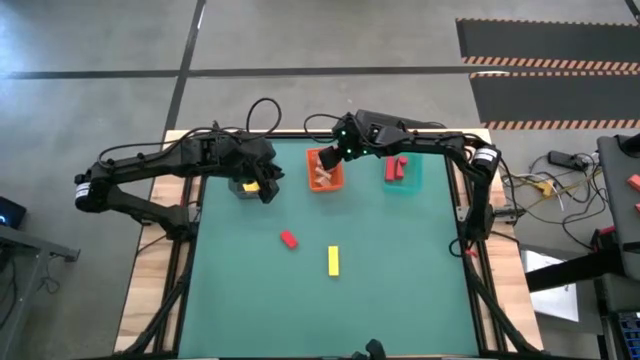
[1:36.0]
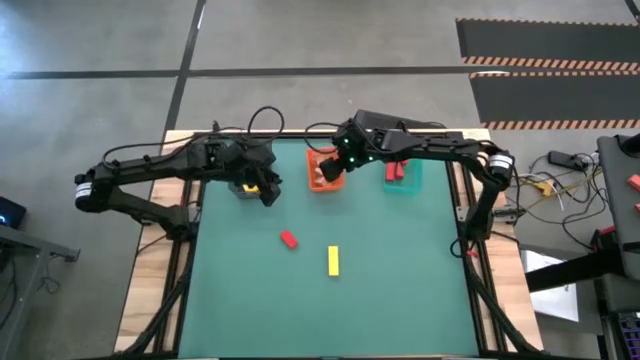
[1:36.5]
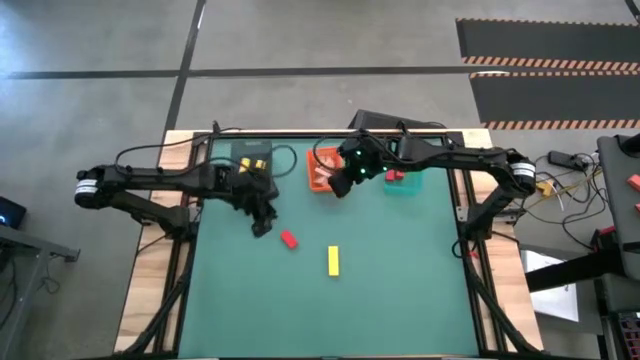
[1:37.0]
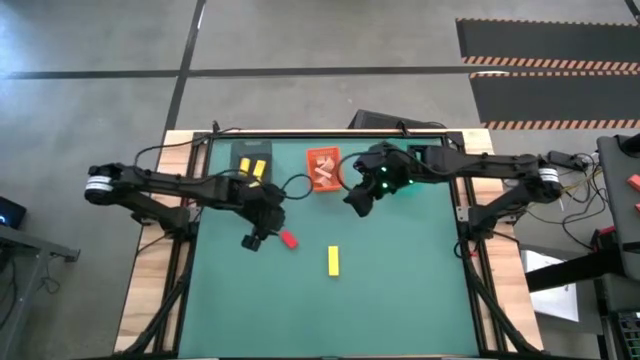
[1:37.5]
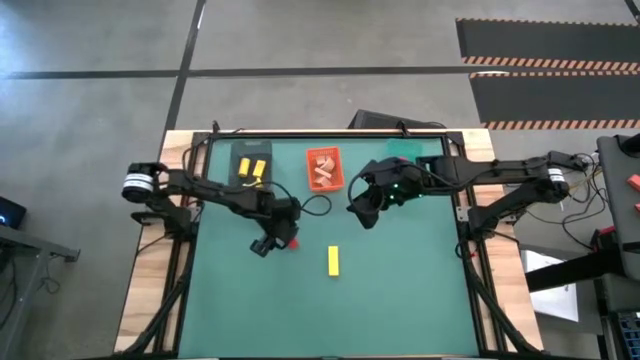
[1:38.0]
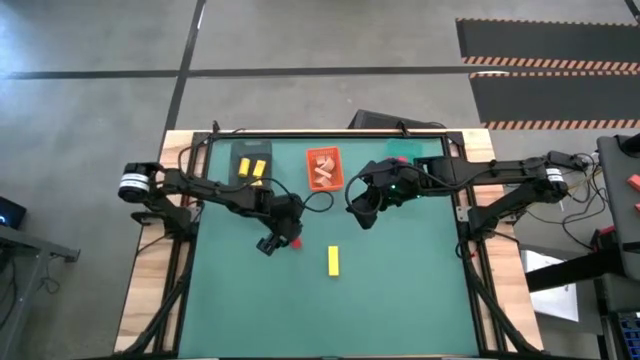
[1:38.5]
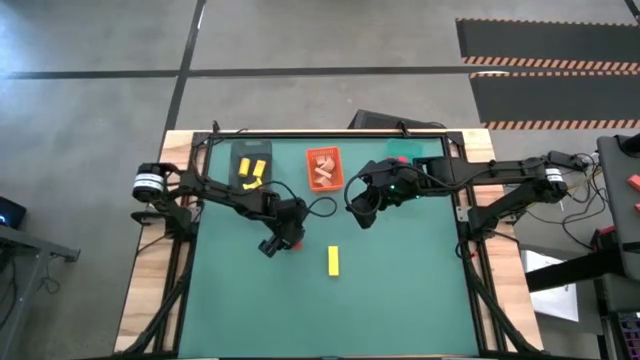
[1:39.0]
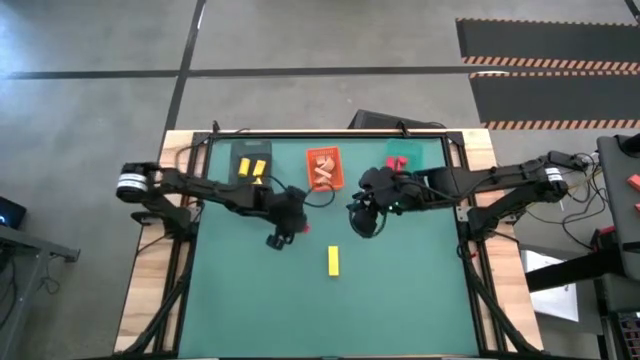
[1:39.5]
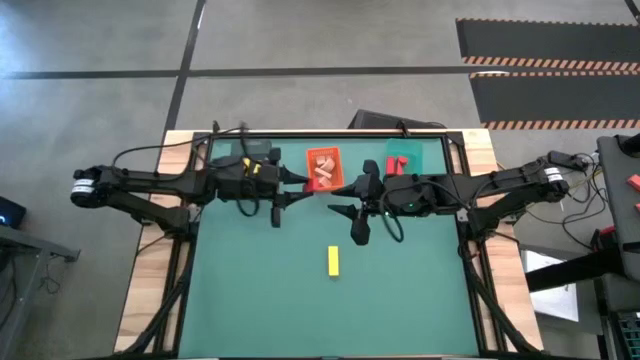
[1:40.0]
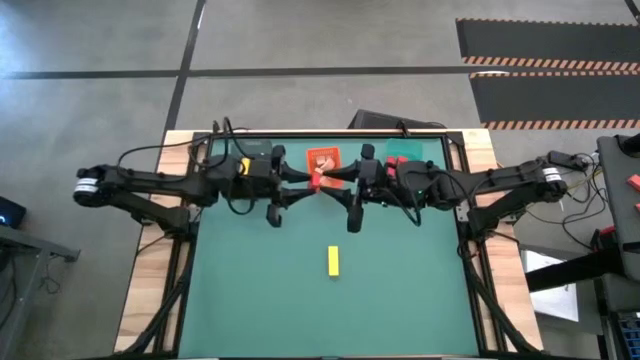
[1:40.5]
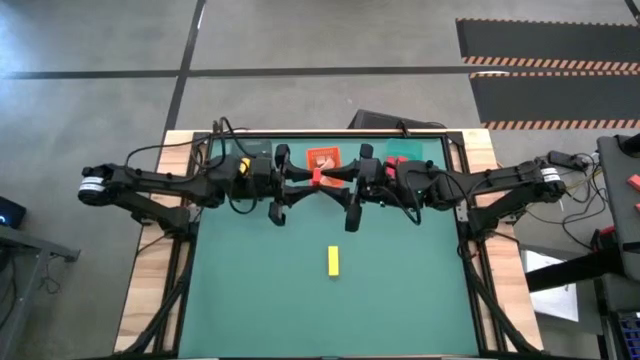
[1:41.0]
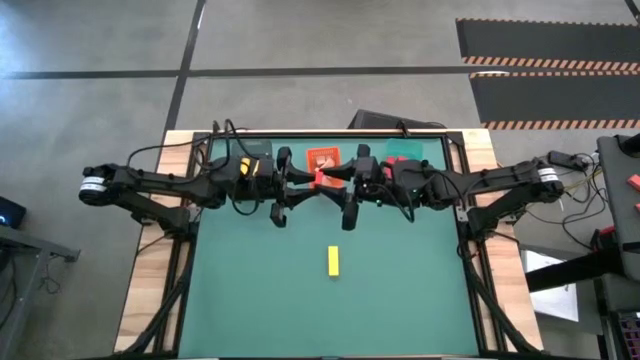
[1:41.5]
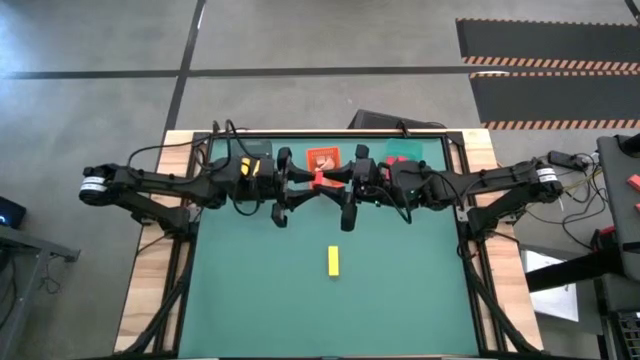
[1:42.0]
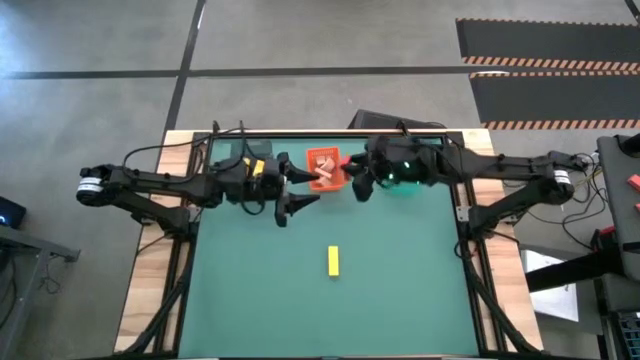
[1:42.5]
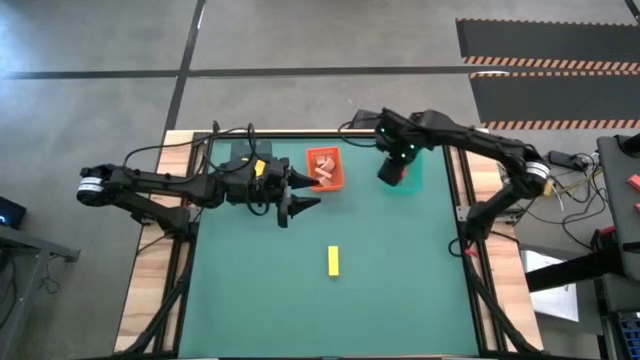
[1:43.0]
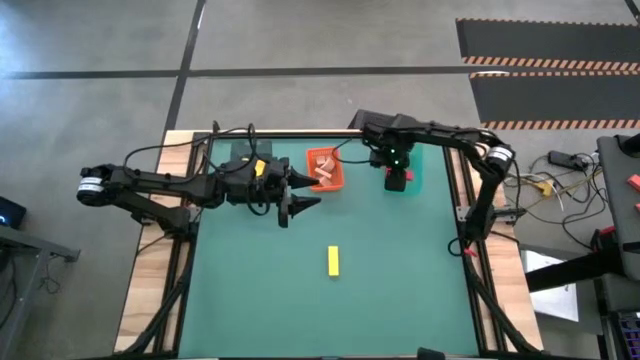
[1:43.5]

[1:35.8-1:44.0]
Task: Sort & place blocks by color
Put the red block into the green bin

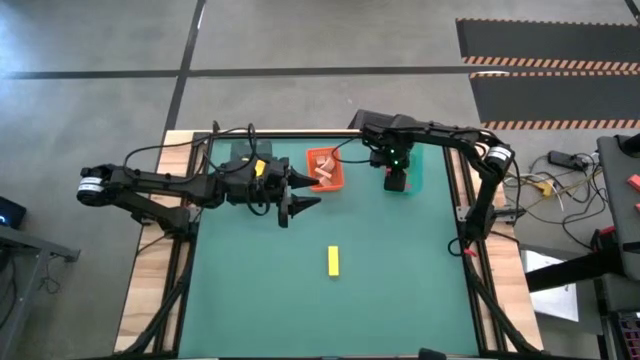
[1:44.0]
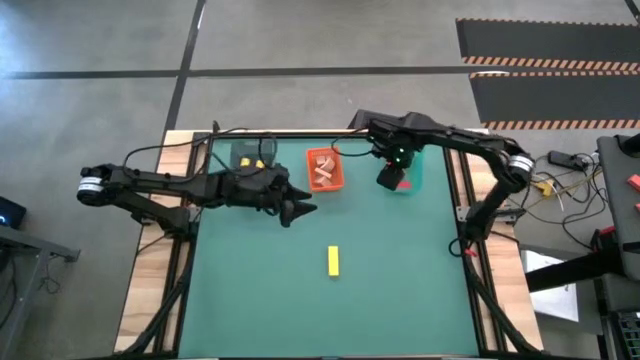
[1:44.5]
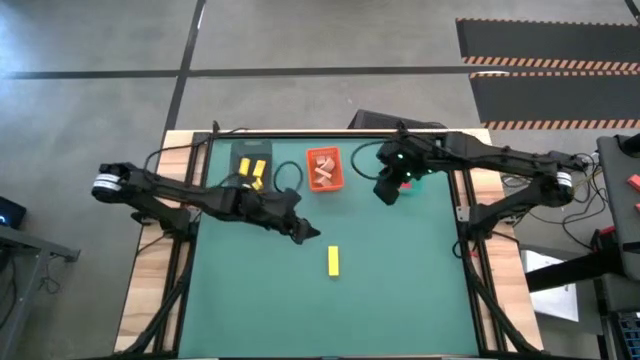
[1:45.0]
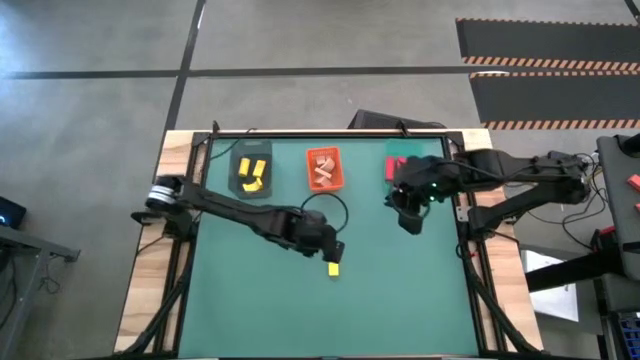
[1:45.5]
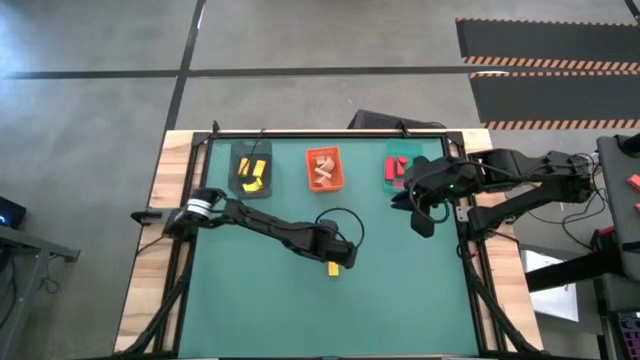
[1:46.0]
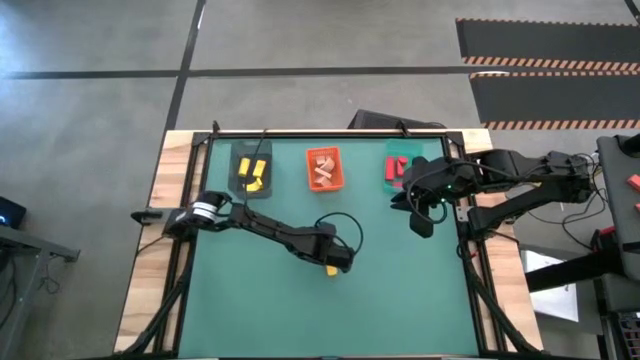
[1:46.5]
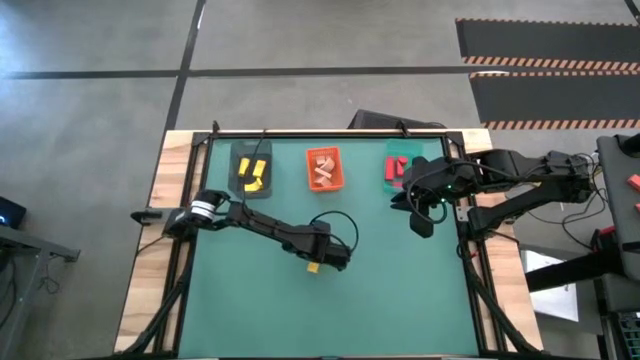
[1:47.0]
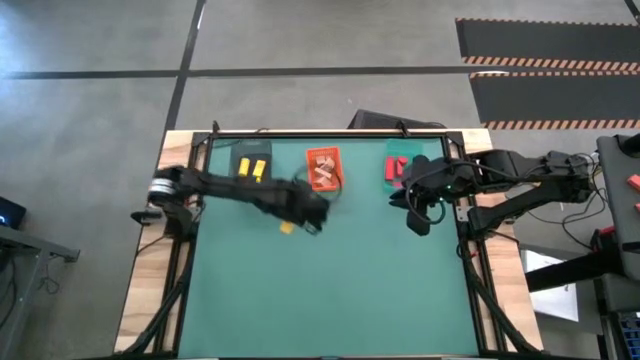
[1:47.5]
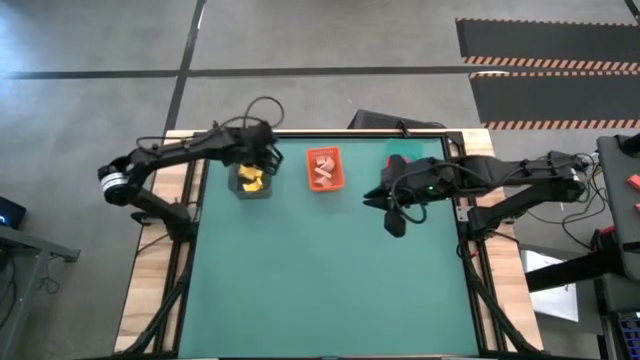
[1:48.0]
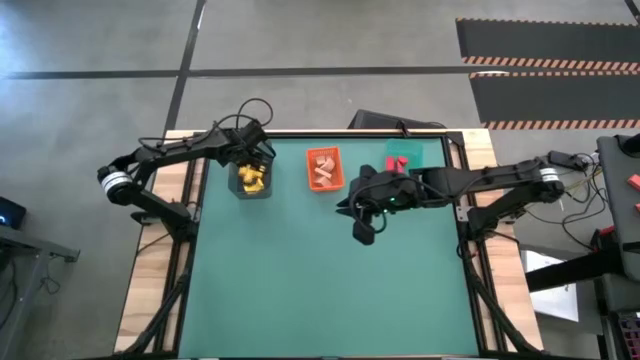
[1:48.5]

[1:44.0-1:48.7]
Put the yellow block into the black bin

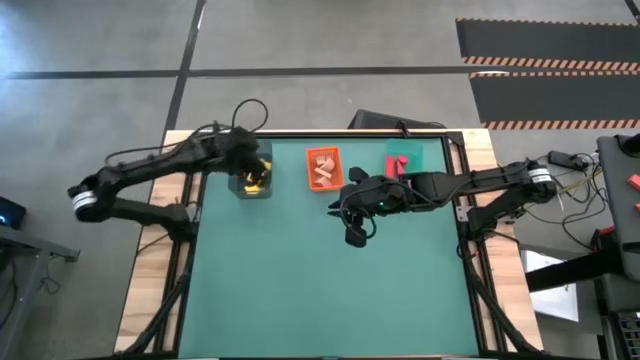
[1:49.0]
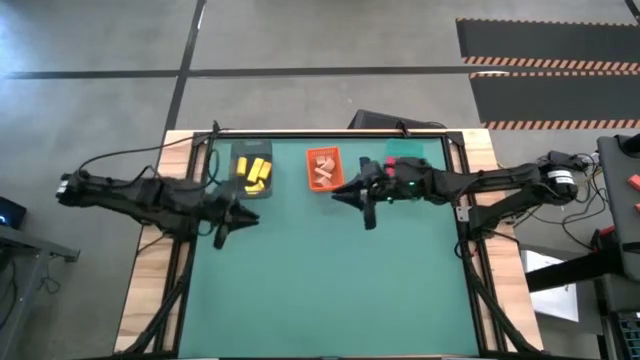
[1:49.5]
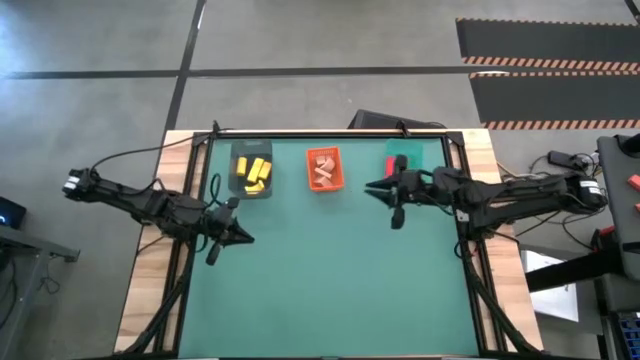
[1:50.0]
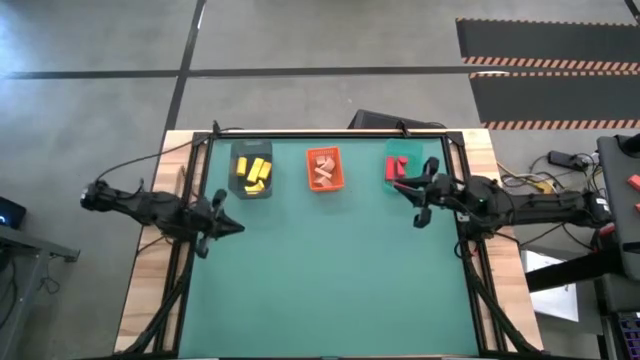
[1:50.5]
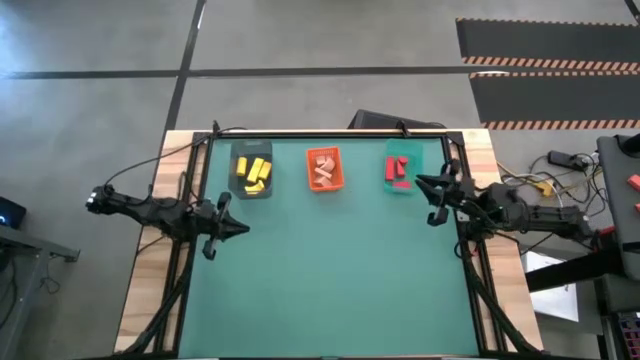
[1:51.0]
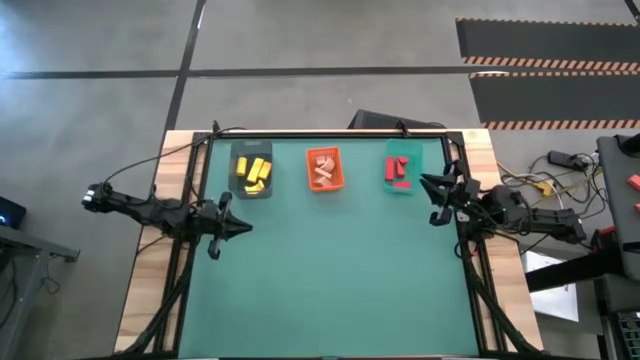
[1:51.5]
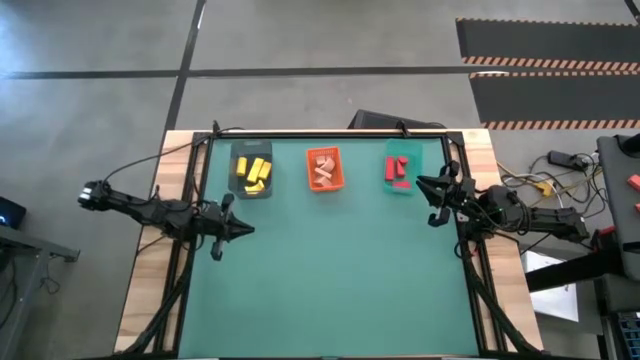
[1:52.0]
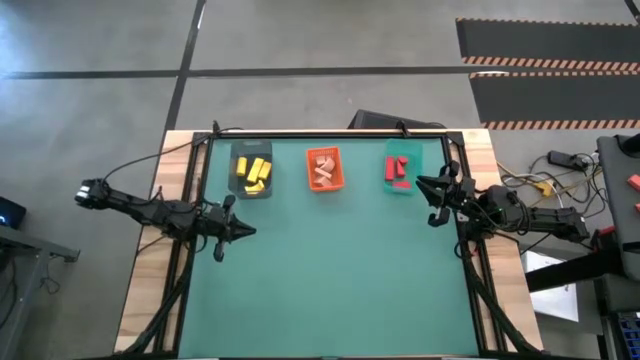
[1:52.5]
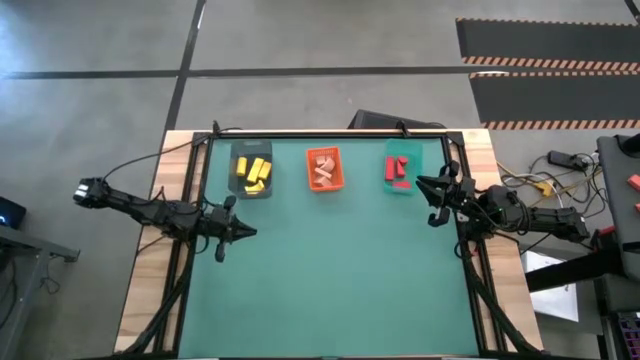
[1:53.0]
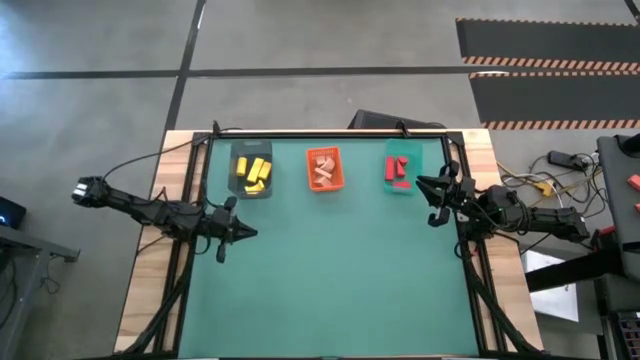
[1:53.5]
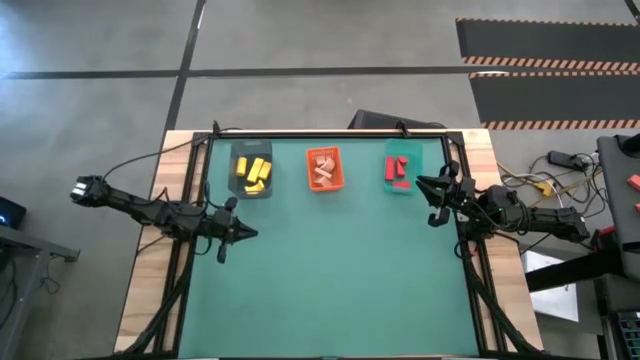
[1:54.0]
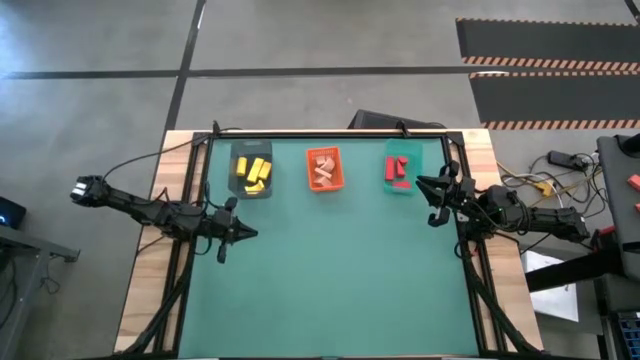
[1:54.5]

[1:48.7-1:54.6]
Return to Home Position

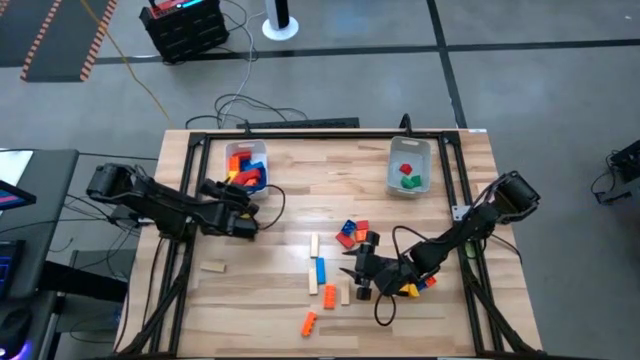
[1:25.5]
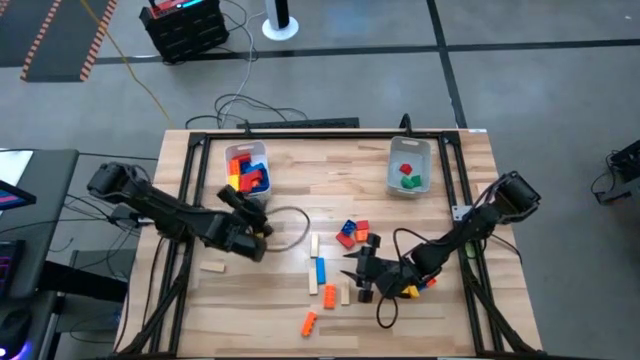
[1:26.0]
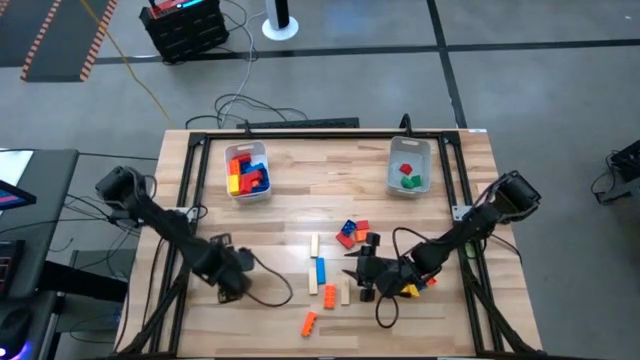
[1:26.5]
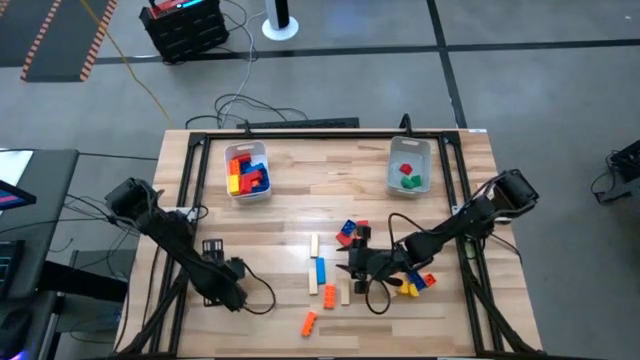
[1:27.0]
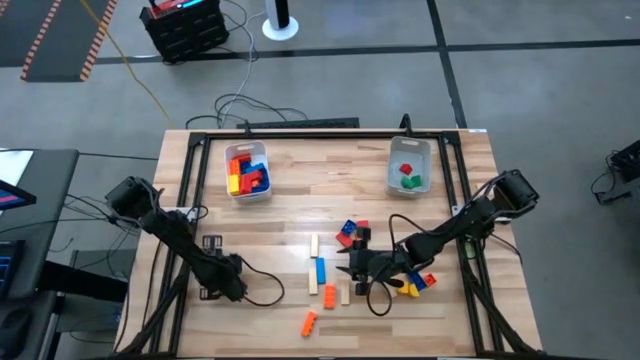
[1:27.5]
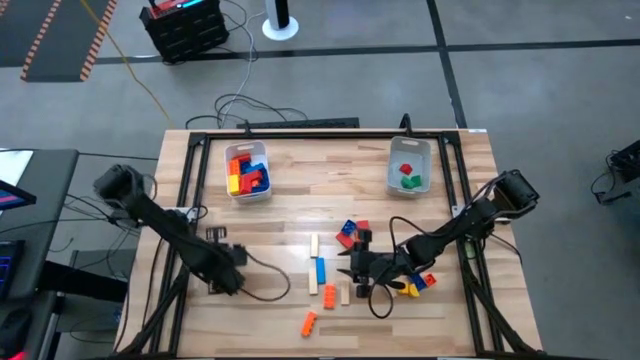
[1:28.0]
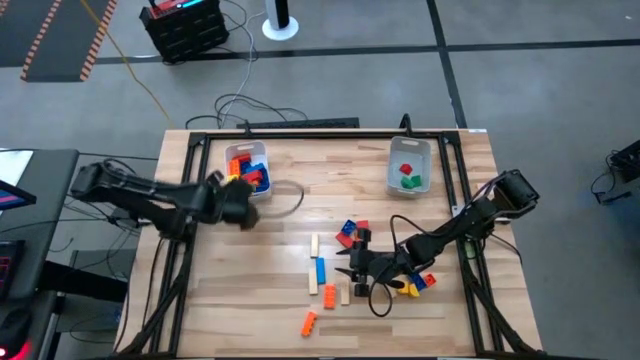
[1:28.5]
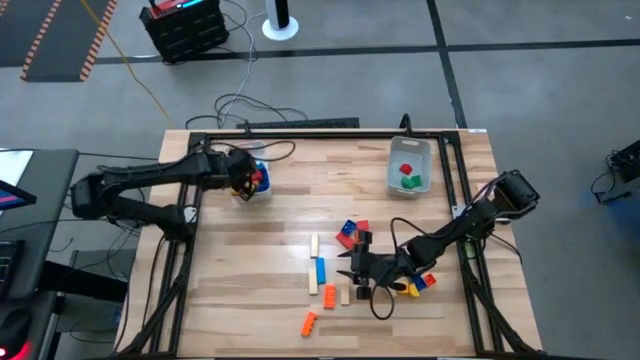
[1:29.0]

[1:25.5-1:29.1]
Task: Sort blocks by size
Put the large light brown block into the white bin
